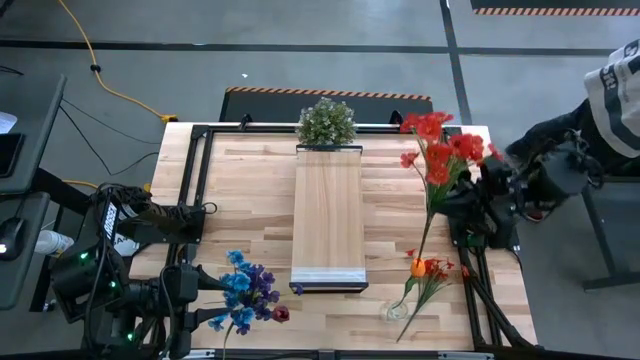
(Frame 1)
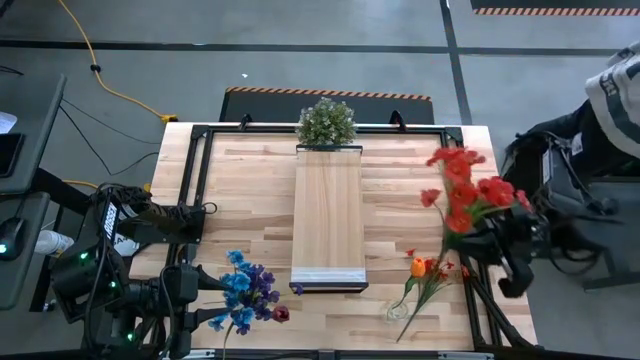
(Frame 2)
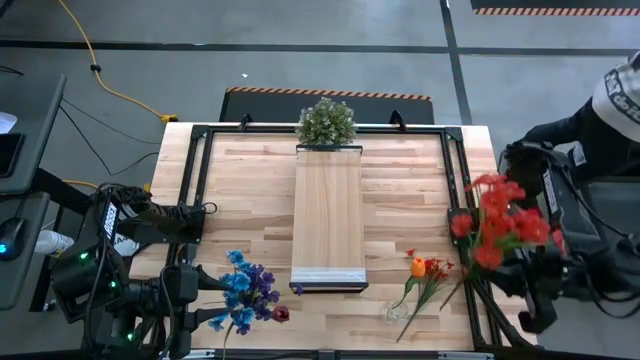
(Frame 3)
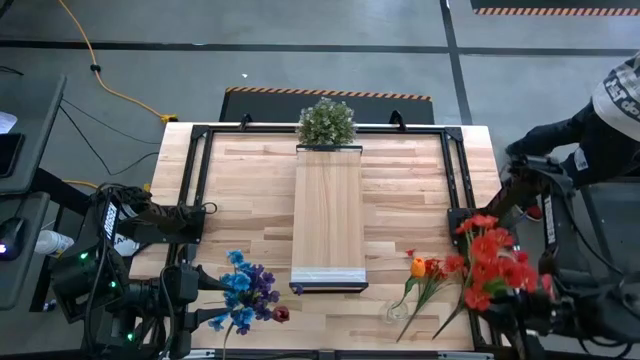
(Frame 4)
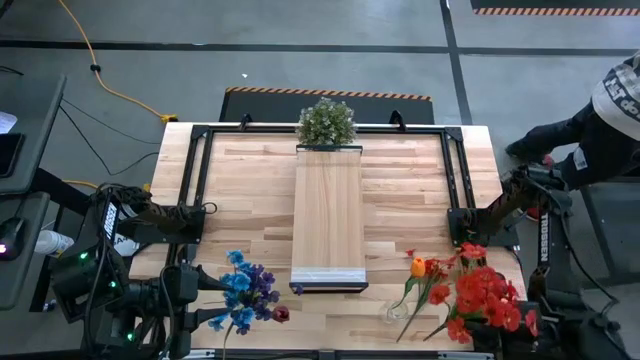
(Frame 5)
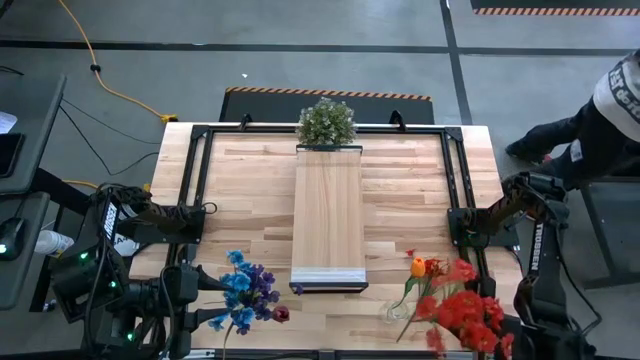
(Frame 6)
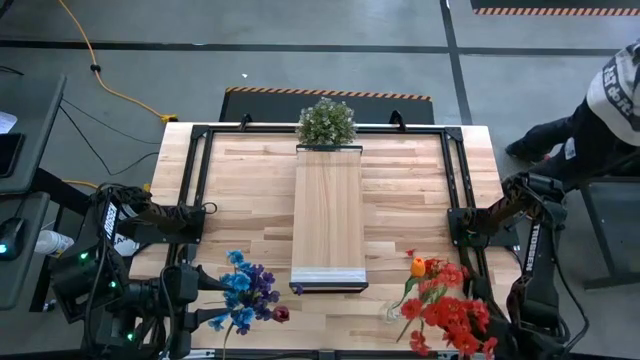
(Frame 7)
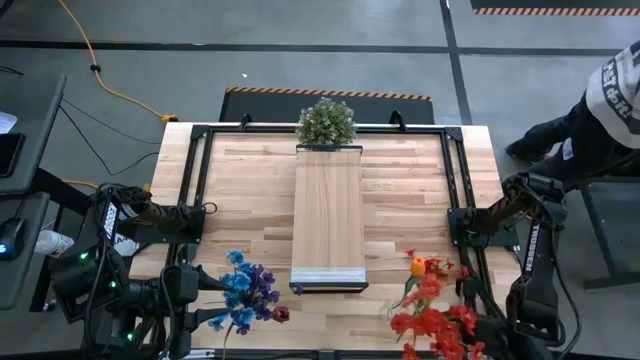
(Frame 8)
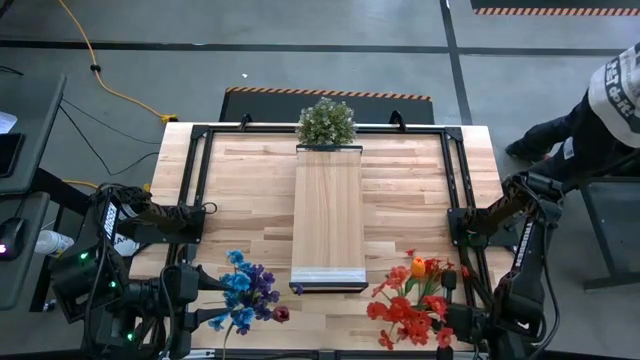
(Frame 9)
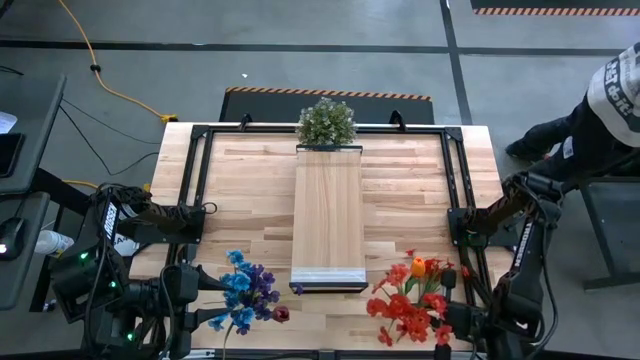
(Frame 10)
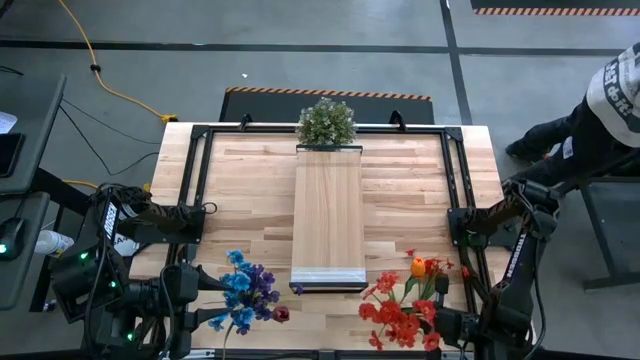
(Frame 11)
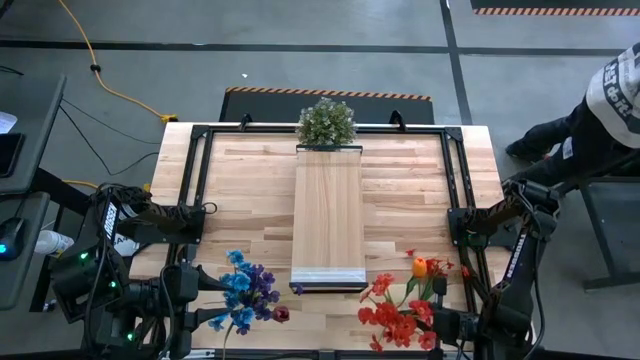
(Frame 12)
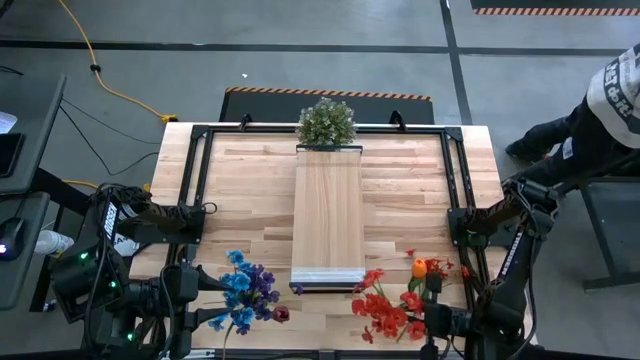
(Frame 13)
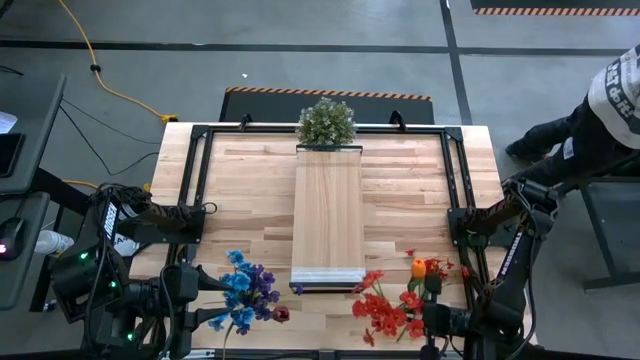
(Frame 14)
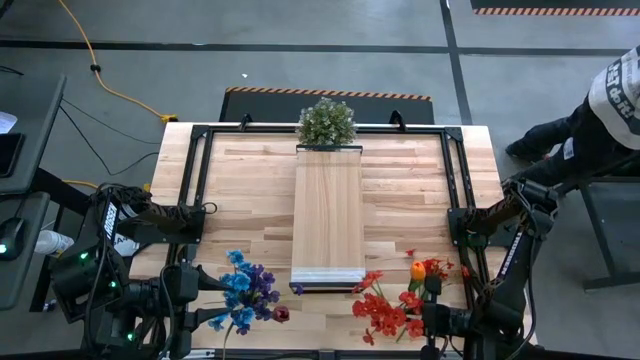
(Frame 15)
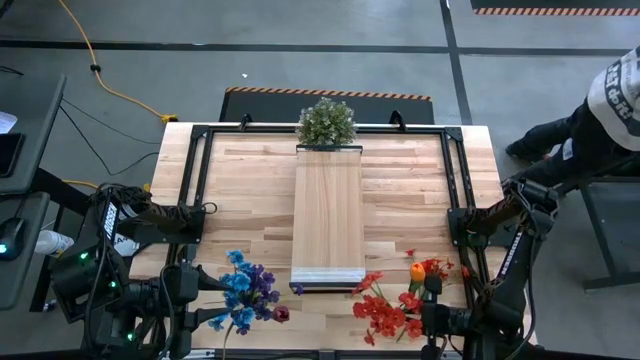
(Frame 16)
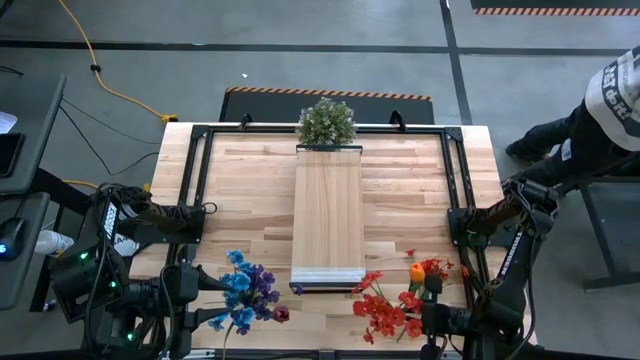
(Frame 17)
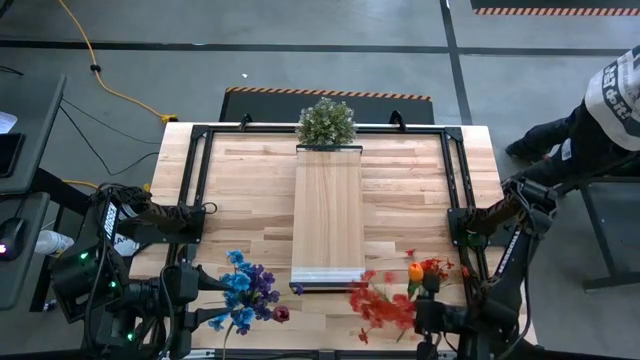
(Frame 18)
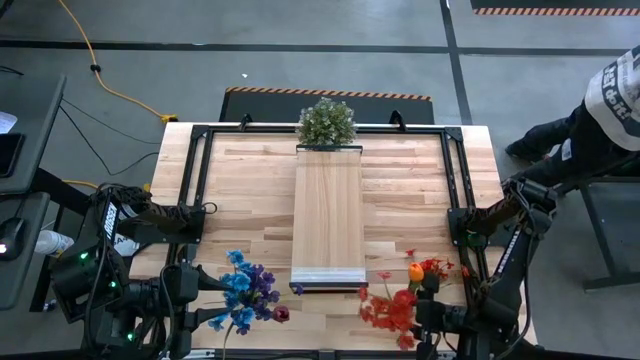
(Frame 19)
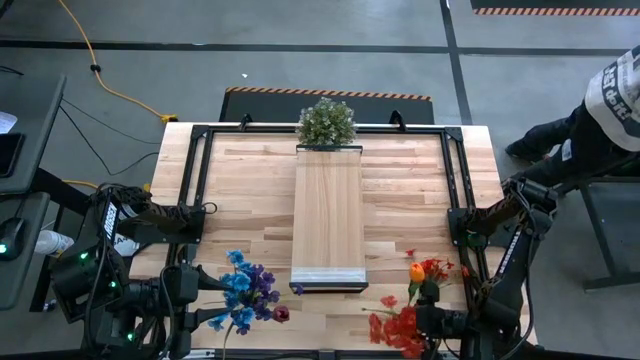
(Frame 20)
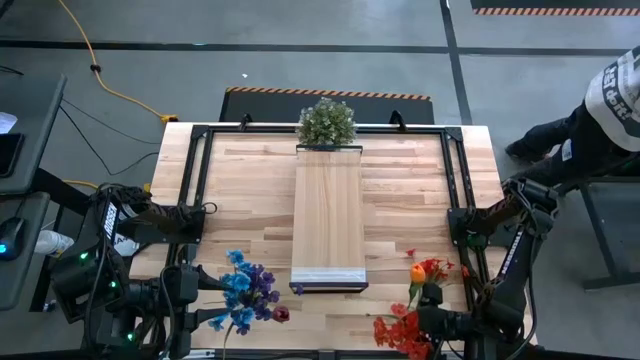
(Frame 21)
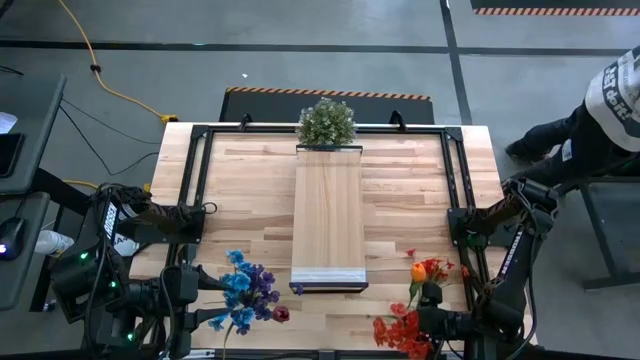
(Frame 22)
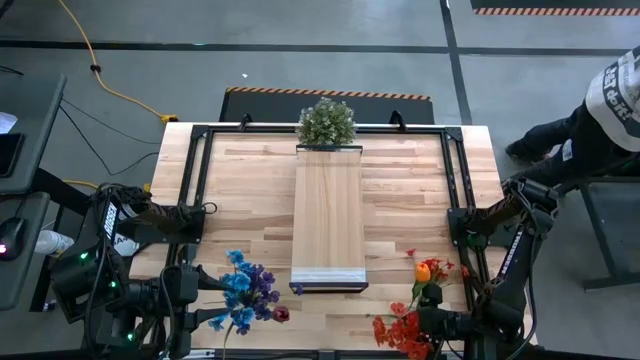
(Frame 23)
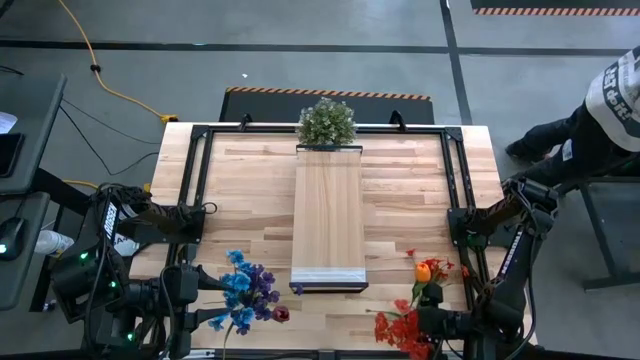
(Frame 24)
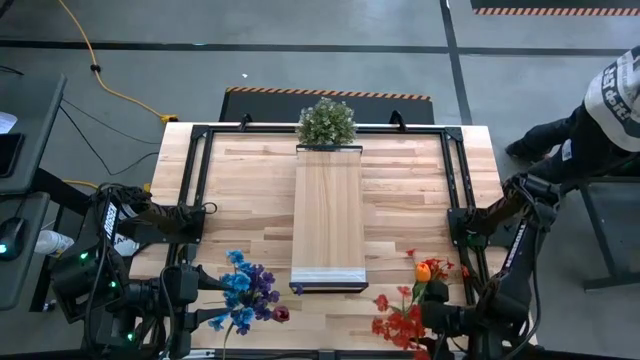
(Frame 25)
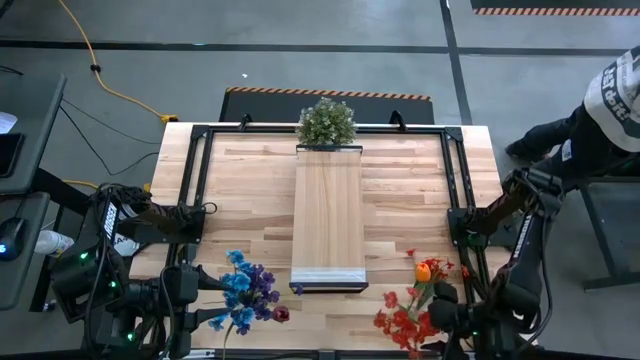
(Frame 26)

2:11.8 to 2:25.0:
Task: Pick and place flowers into a vace then onto a shelf
Put the top red flowers into the right transparent vase

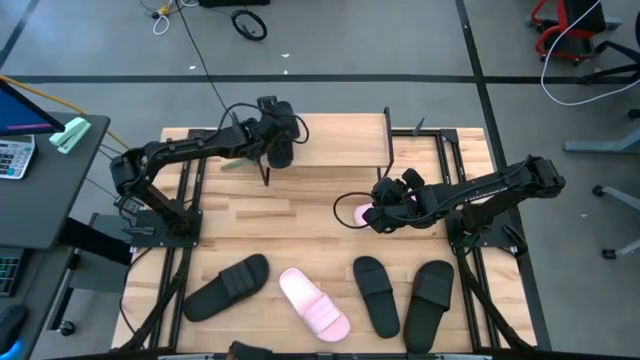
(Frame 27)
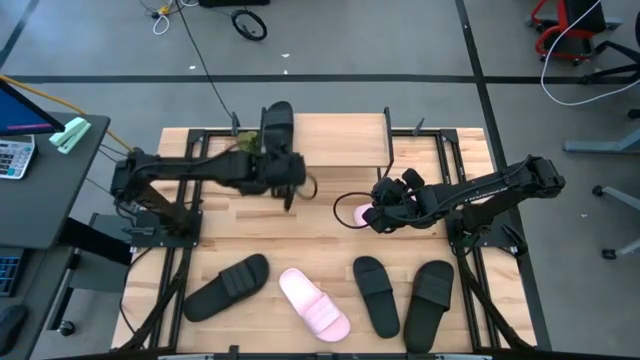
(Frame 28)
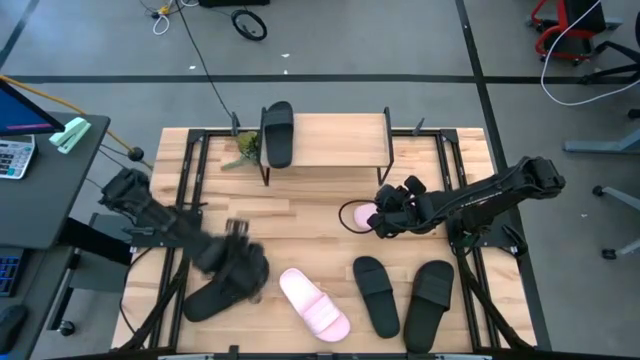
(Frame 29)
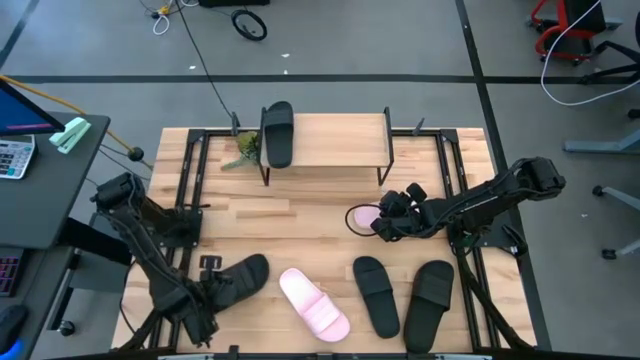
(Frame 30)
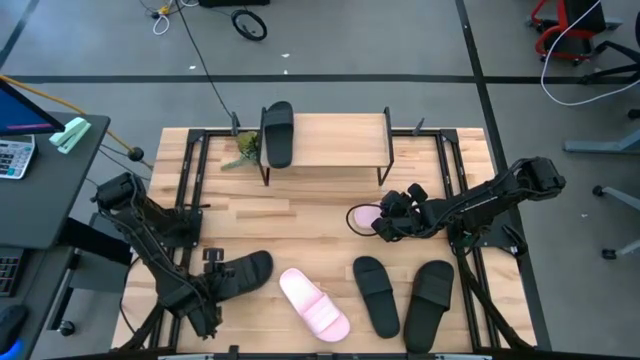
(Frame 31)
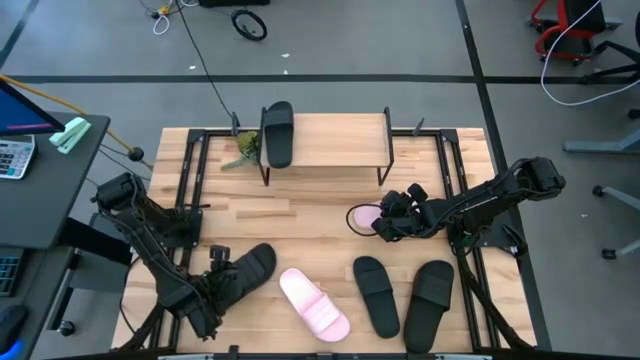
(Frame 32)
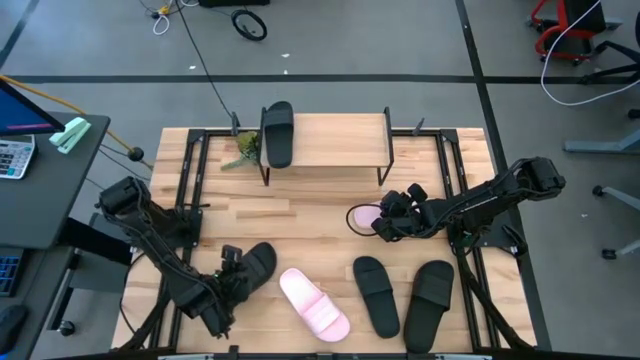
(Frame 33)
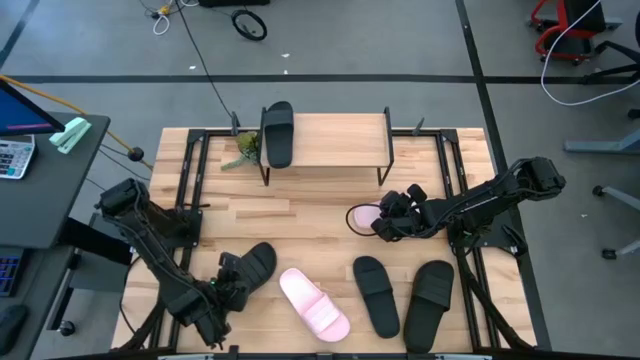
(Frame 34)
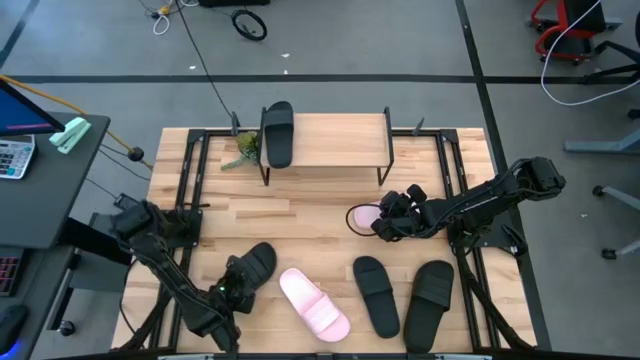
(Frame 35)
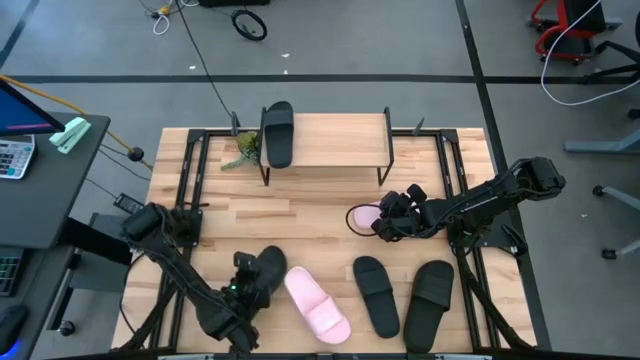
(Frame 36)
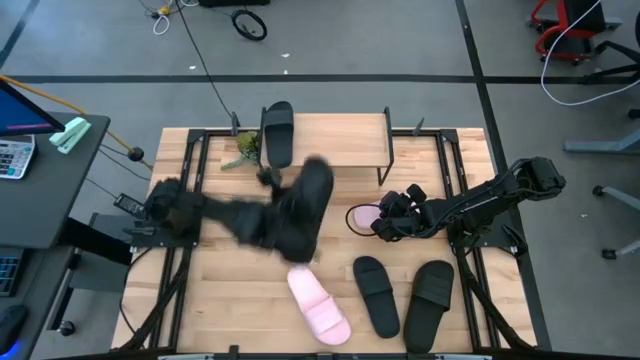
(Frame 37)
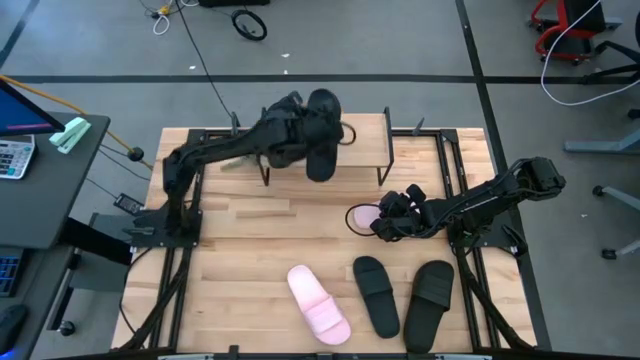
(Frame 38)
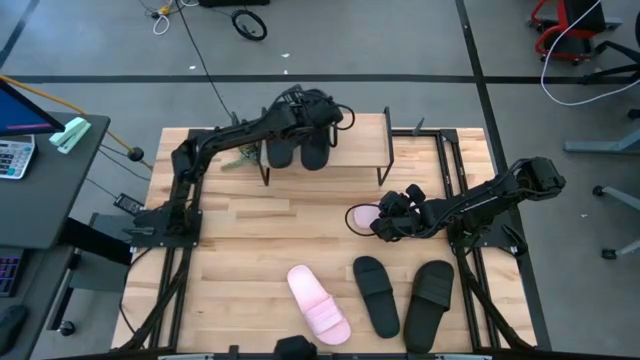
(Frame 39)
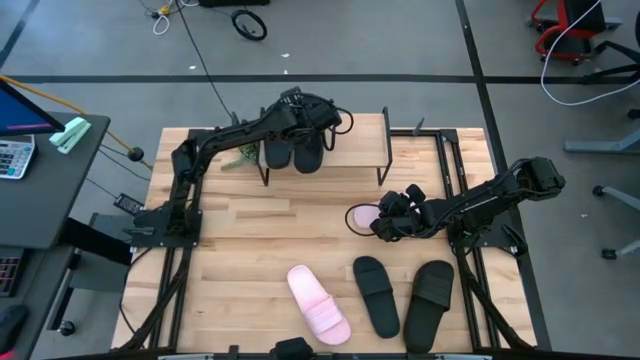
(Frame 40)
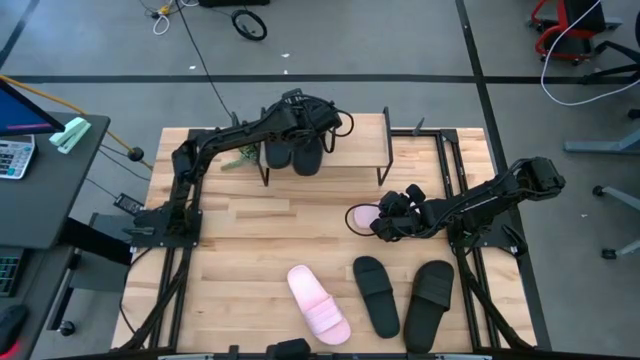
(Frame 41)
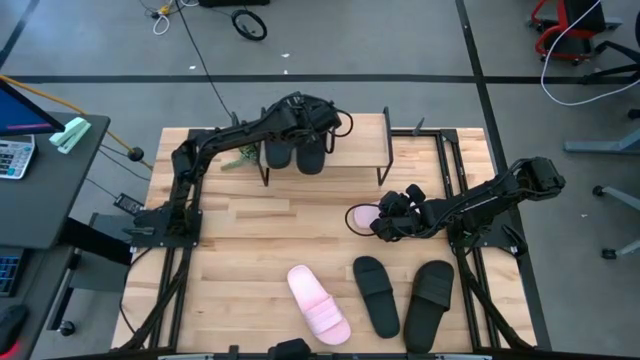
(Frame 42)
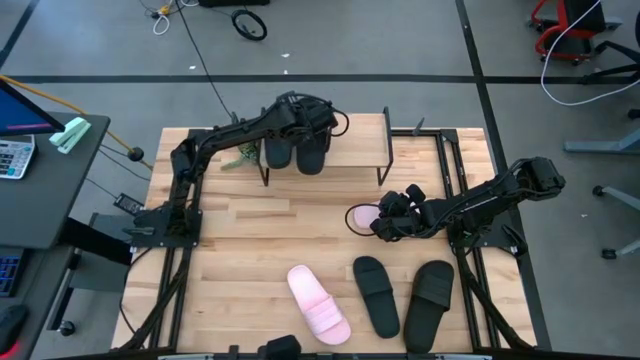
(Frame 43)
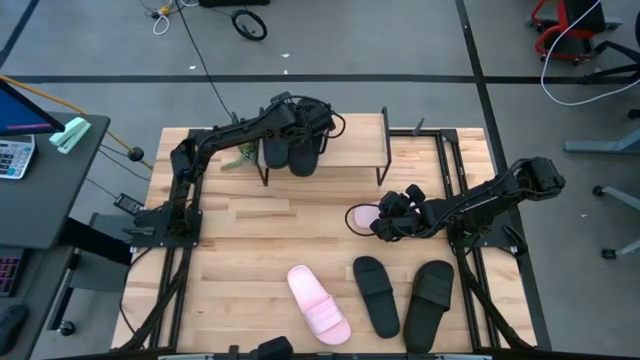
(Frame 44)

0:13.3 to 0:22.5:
Task: Pick and place slides into the shelf
Put the black slide on the shelf
